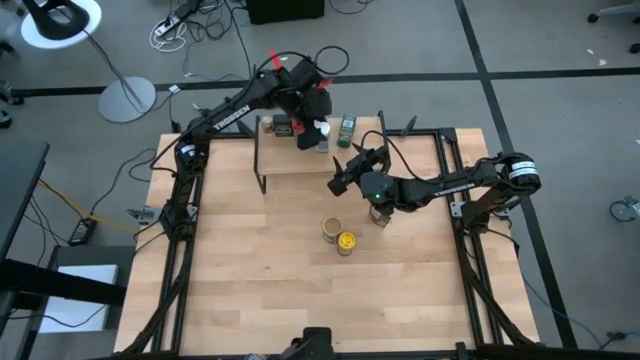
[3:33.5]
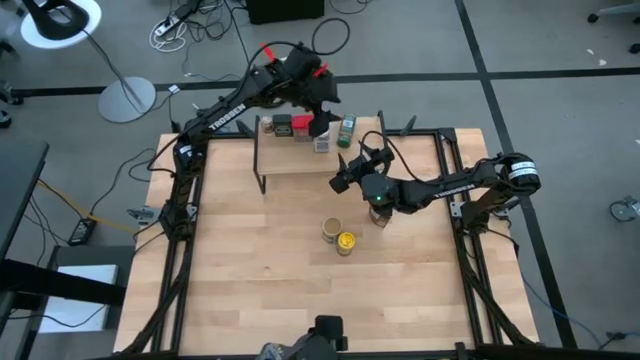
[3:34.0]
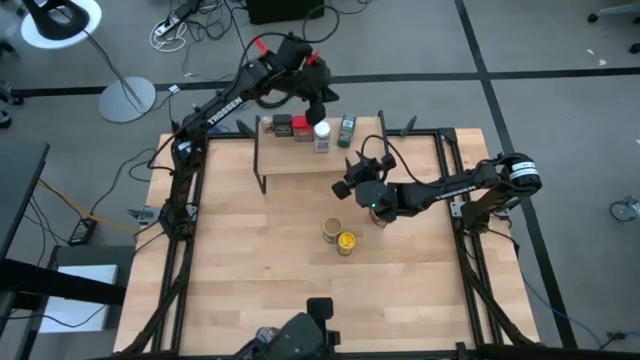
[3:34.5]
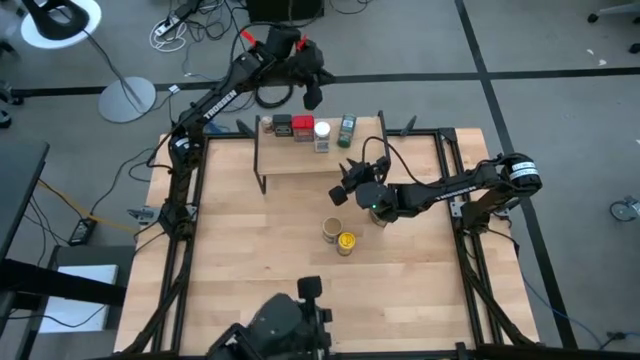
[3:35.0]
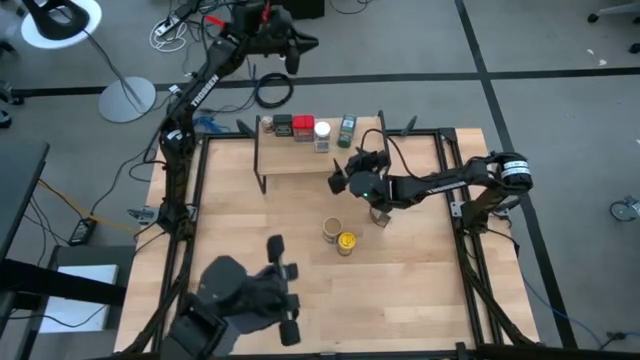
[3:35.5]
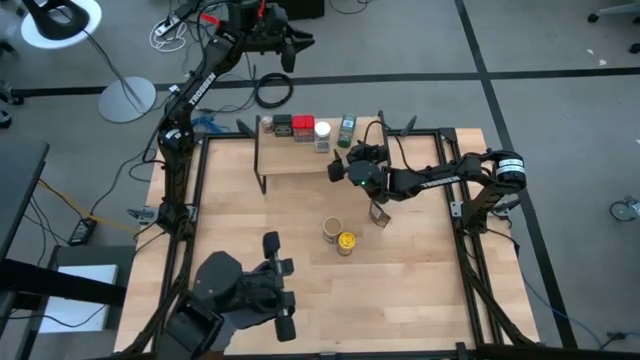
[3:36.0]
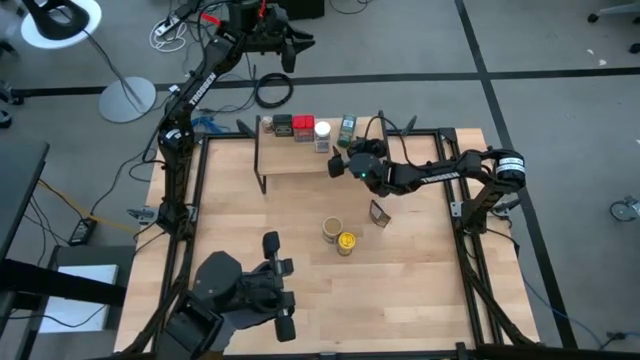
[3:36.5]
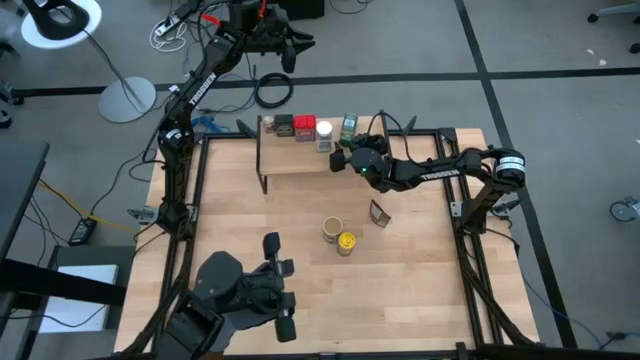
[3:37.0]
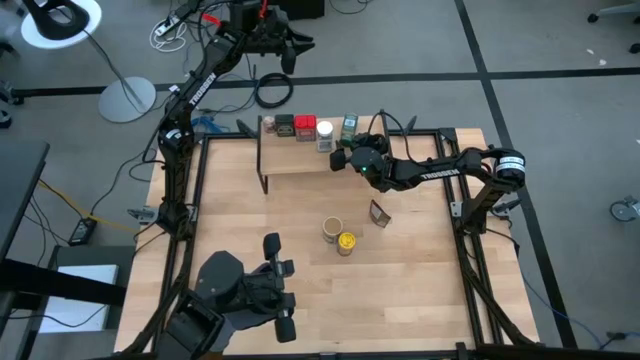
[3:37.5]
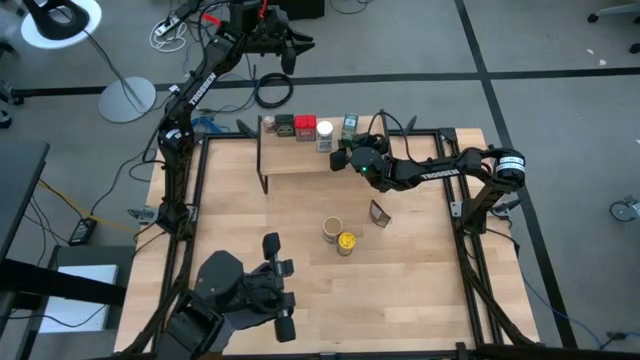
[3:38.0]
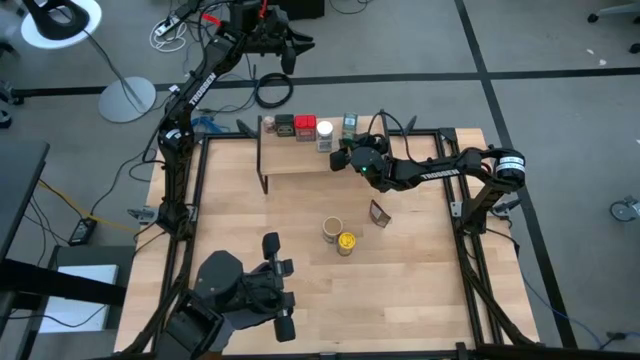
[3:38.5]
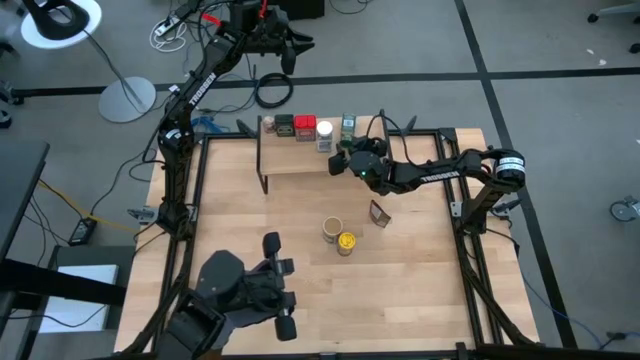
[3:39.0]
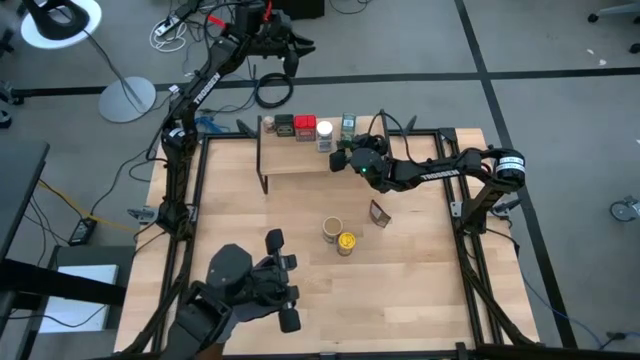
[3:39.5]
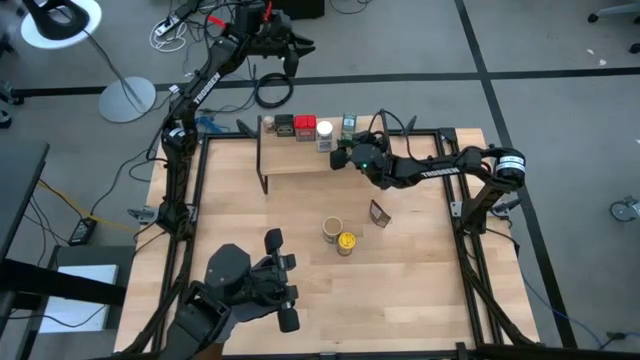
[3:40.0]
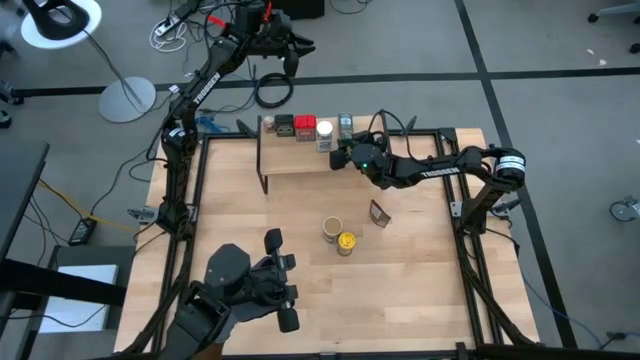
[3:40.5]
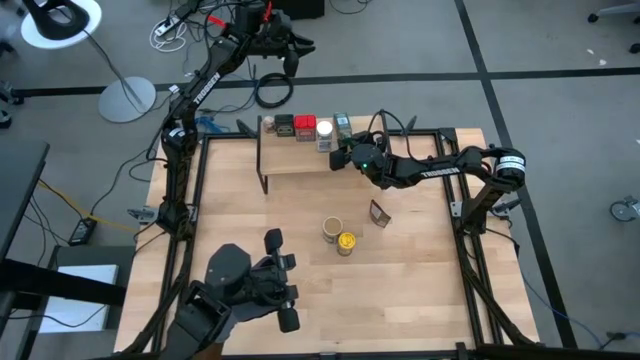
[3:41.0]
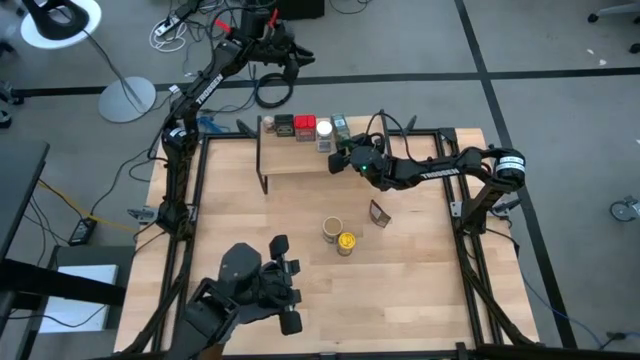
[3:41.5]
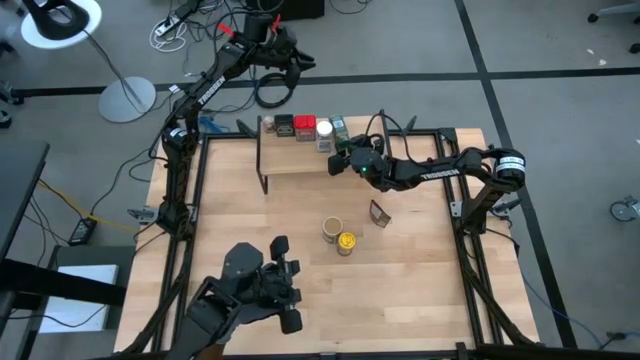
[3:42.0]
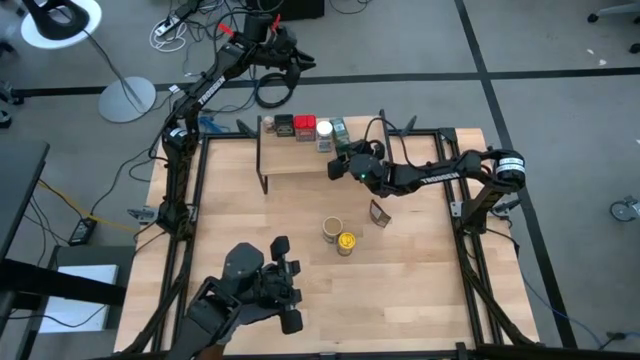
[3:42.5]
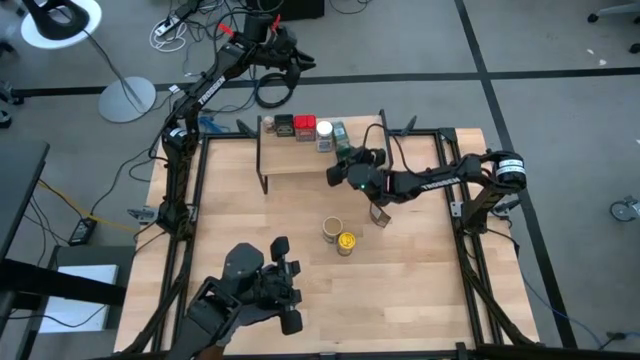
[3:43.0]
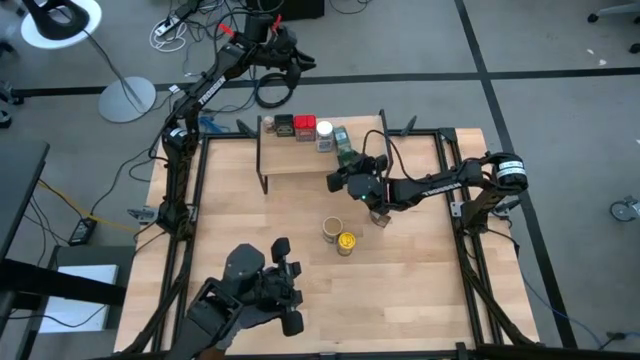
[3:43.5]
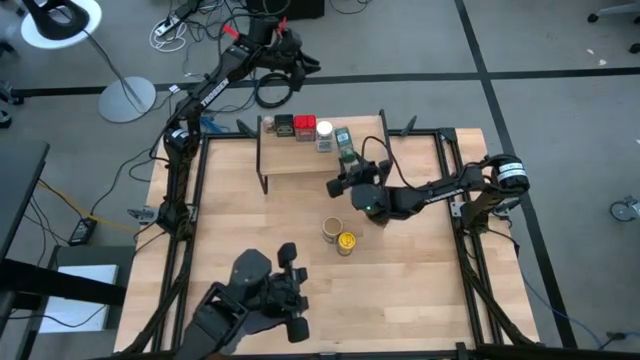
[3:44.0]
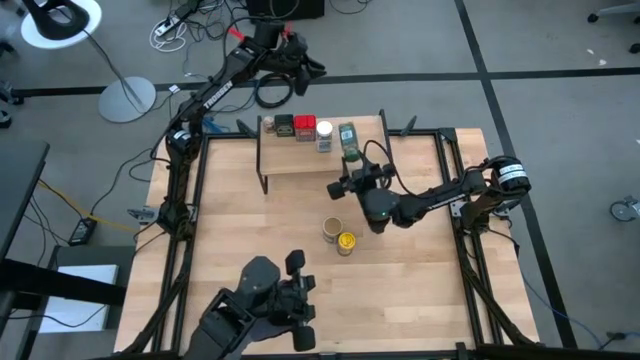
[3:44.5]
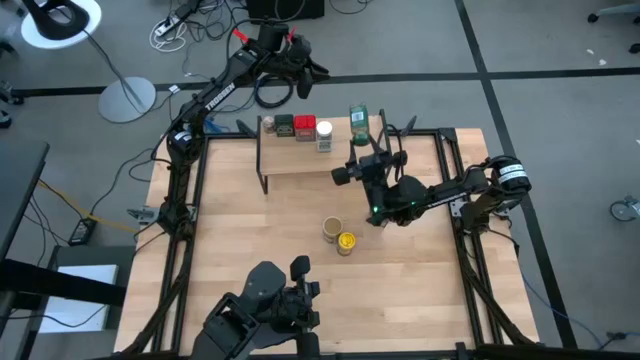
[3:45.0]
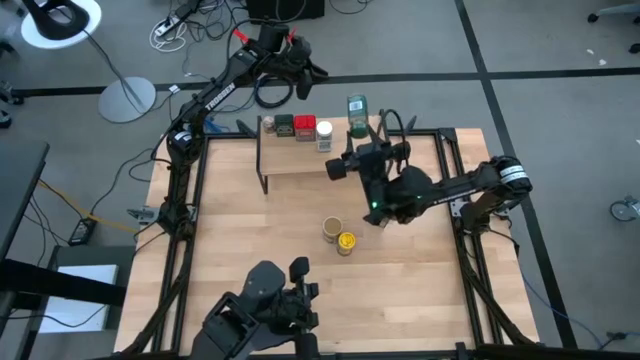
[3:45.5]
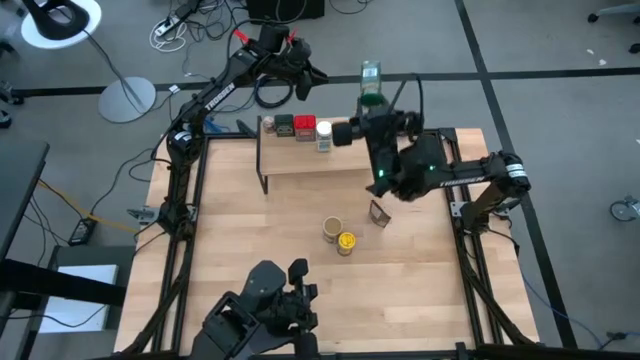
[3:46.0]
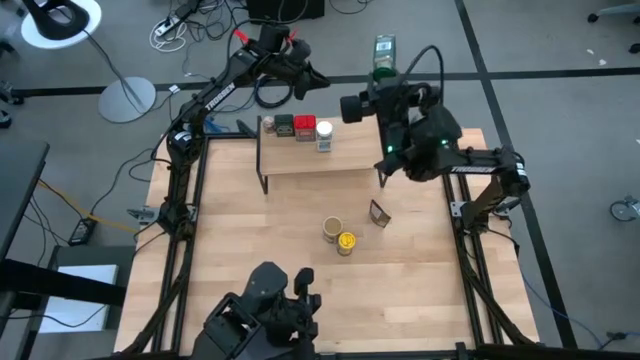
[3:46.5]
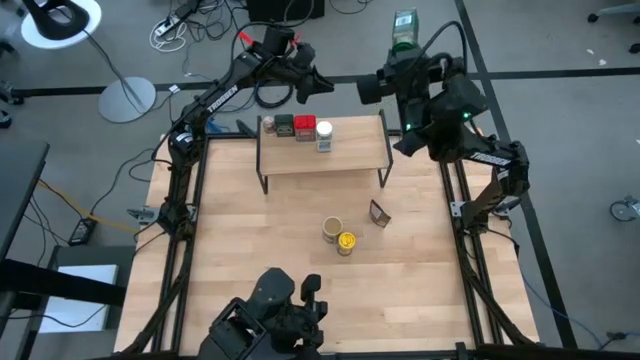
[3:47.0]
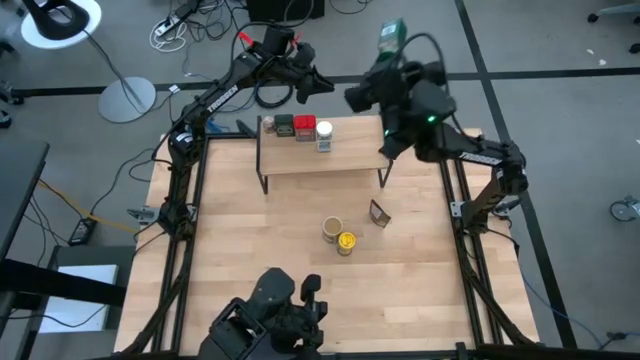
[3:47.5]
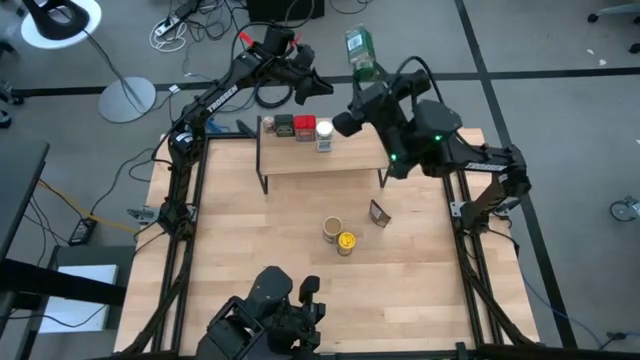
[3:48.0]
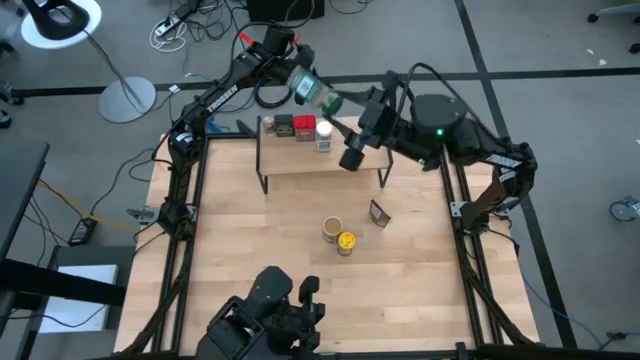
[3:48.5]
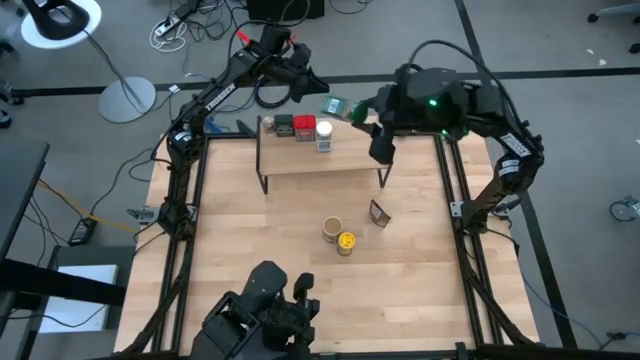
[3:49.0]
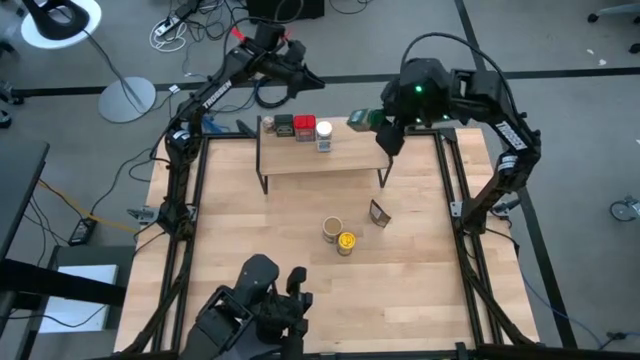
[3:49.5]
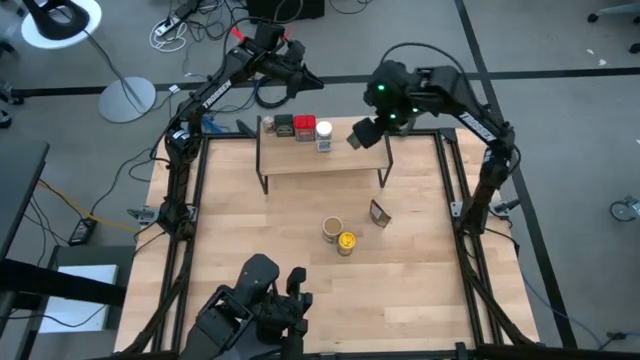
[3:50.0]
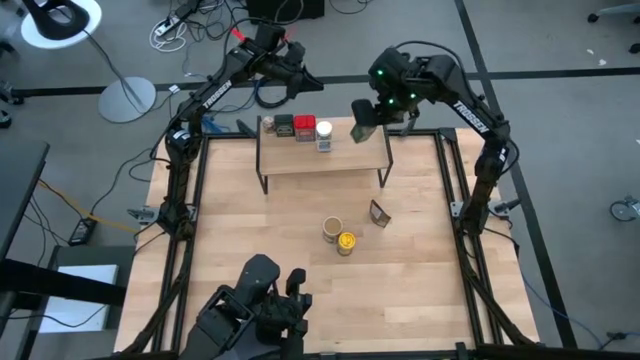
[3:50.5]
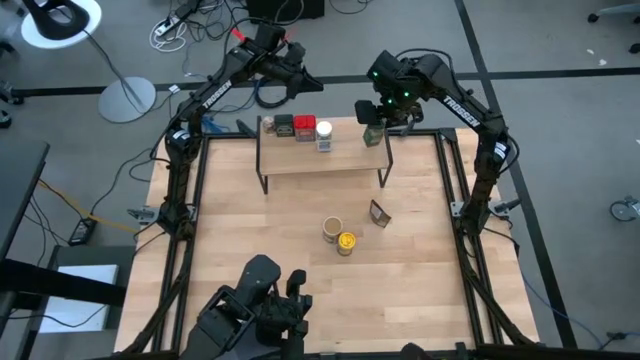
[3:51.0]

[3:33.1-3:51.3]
Task: Shelf spices
Put the green seasoning bottle on the shelf

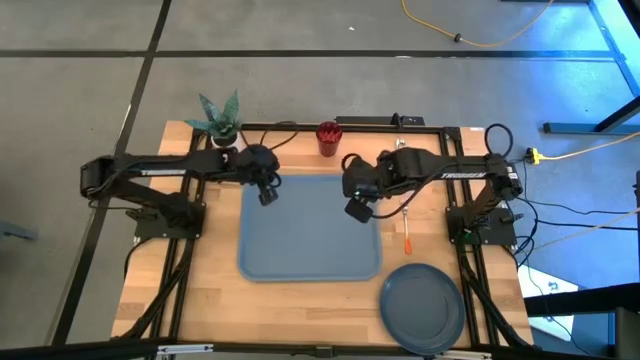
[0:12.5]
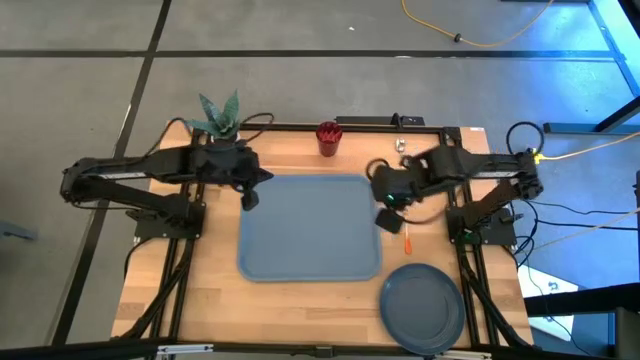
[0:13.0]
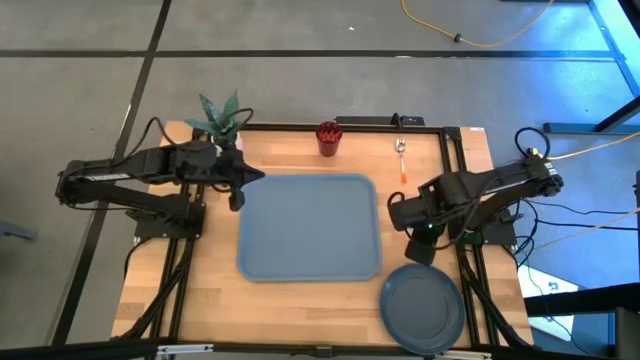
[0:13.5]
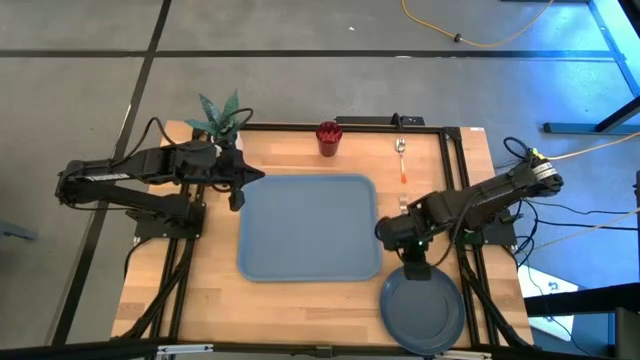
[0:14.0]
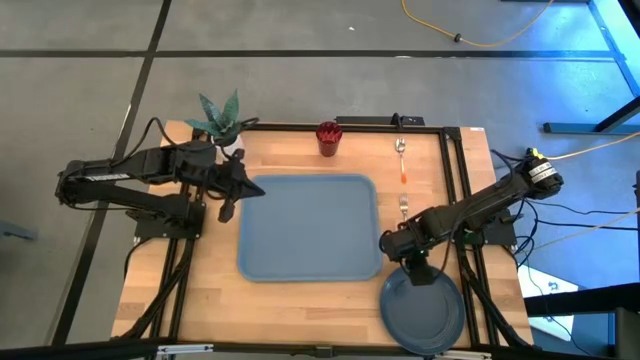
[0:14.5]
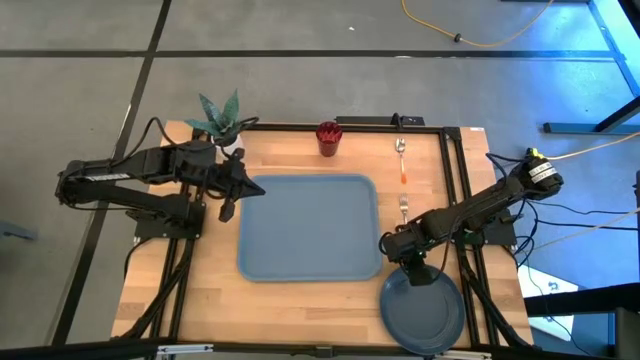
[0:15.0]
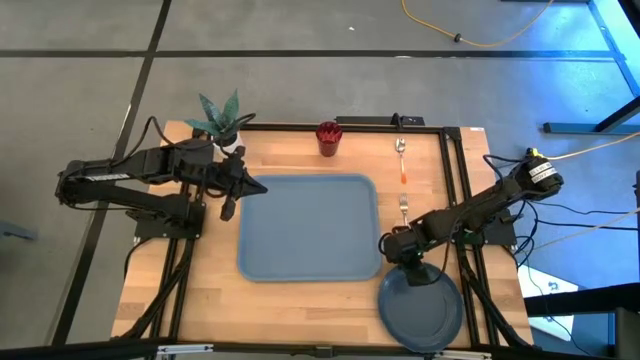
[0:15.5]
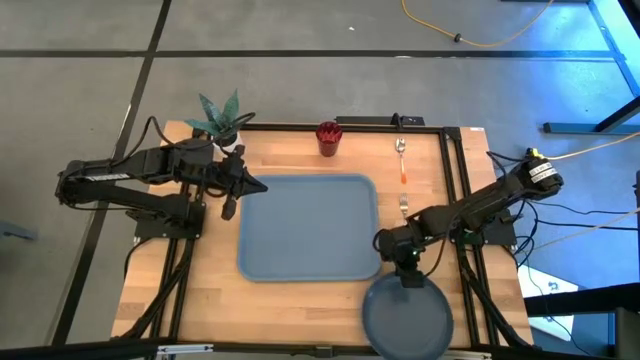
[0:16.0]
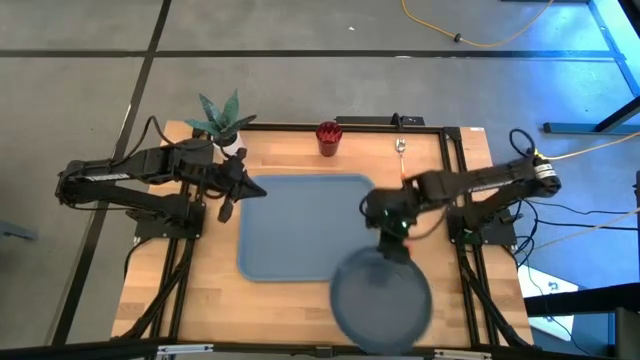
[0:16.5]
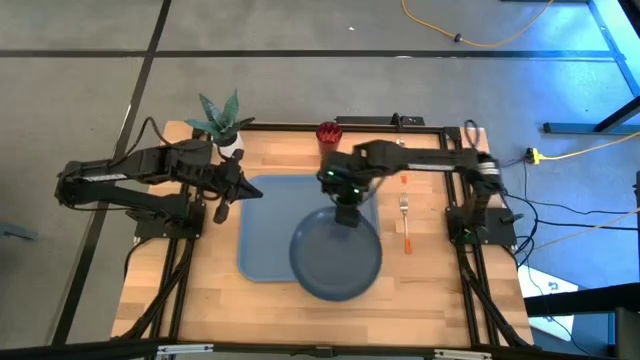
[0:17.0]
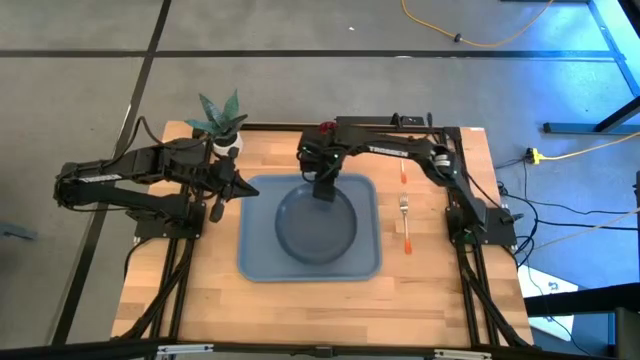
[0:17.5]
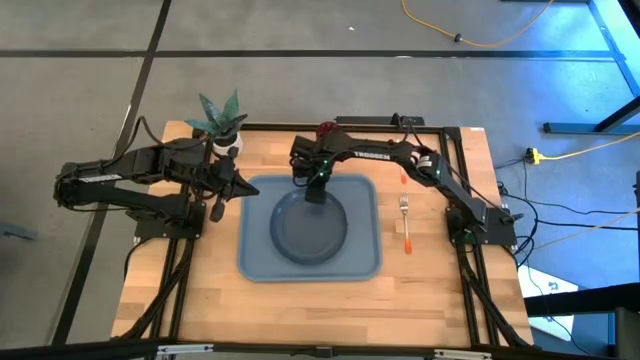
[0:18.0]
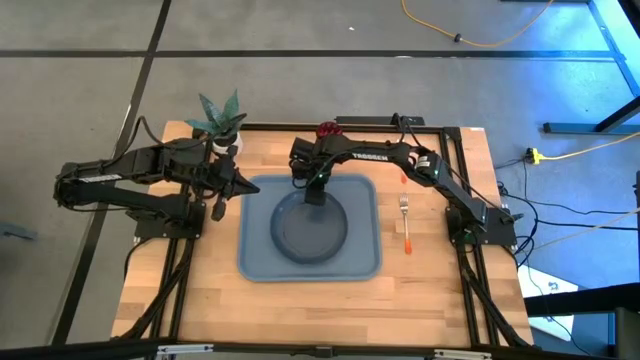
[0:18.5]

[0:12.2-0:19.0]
Task: Pick and place plate/cup/fork/spoon on tray
Put the dark blue plate on the blue tray
